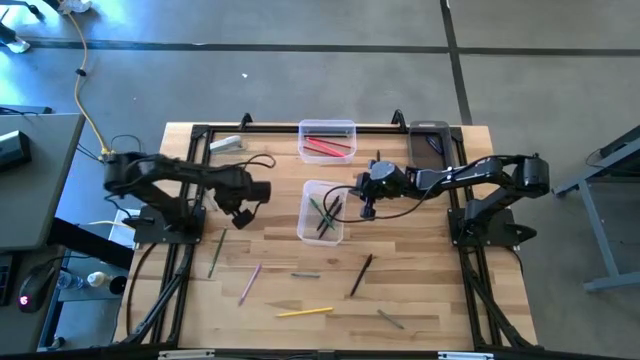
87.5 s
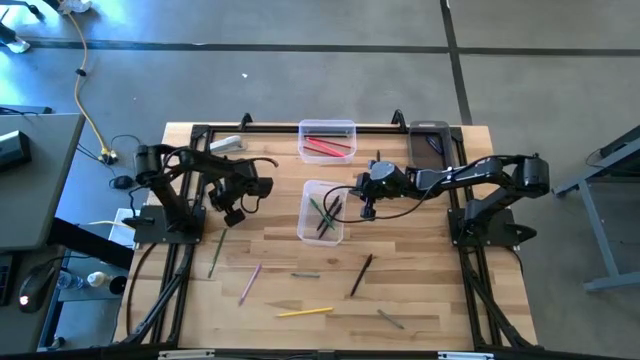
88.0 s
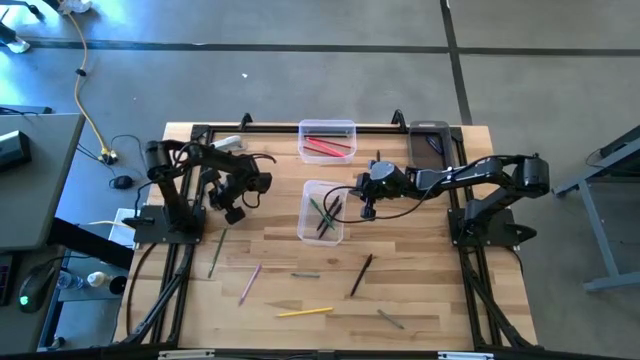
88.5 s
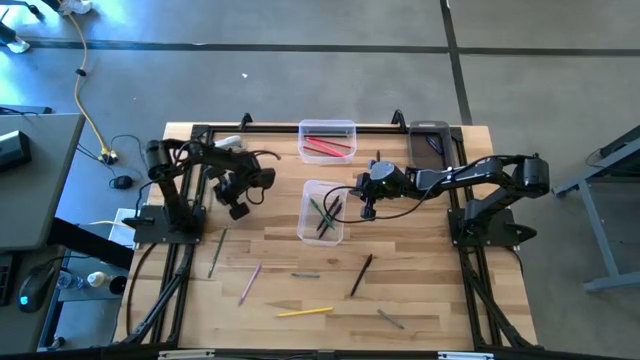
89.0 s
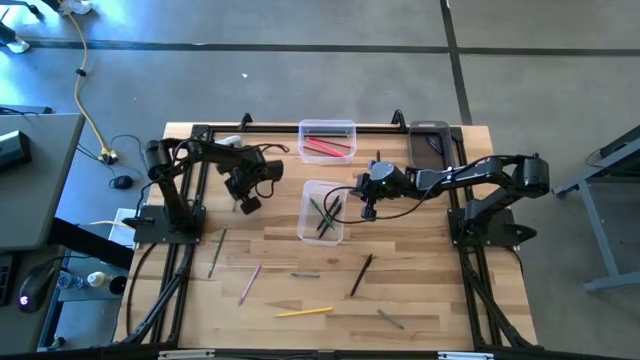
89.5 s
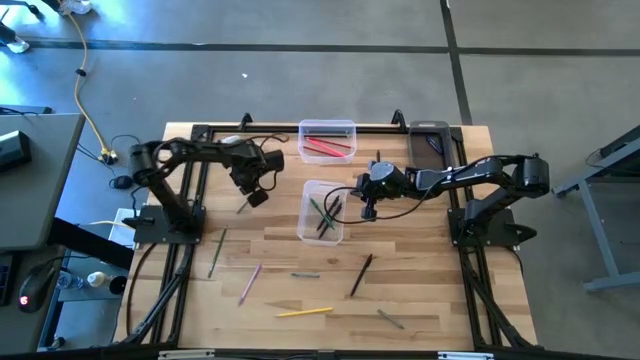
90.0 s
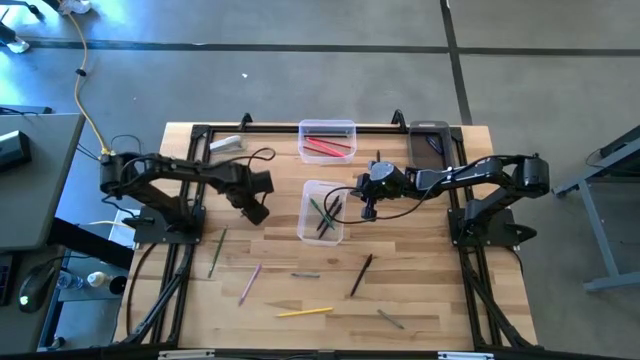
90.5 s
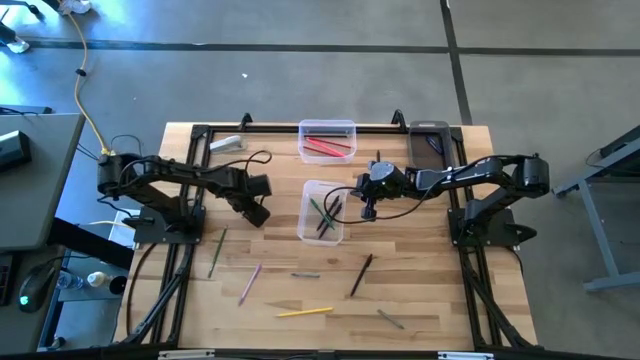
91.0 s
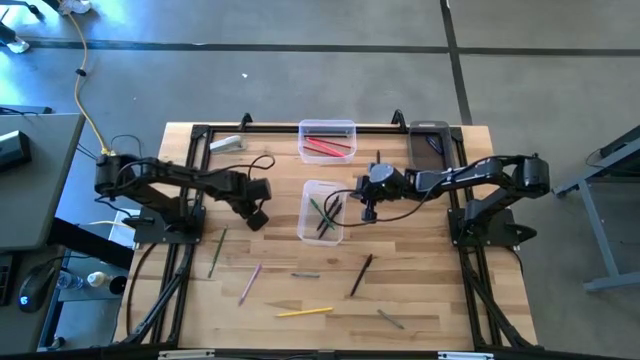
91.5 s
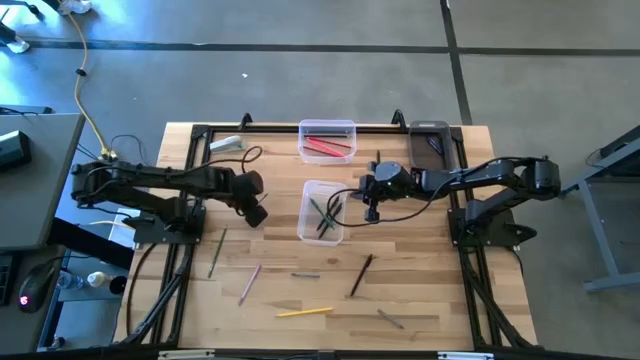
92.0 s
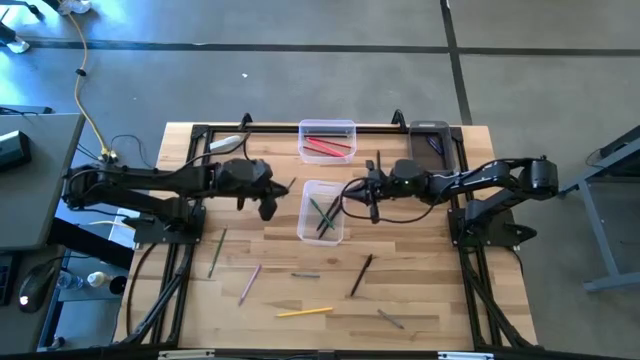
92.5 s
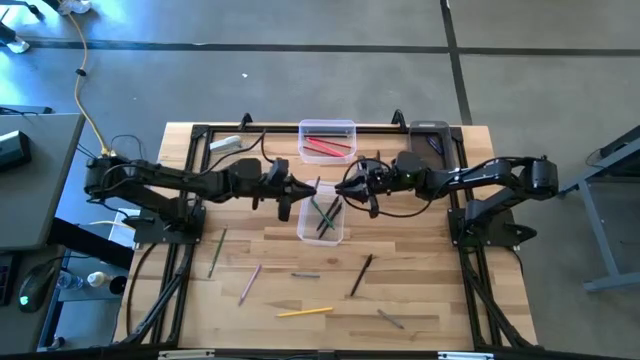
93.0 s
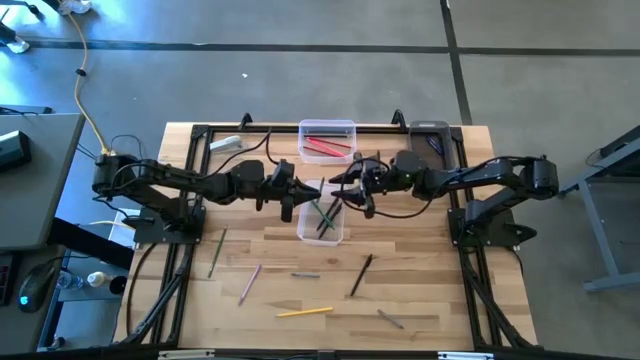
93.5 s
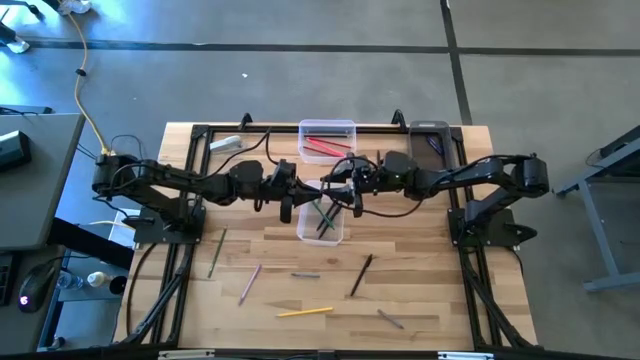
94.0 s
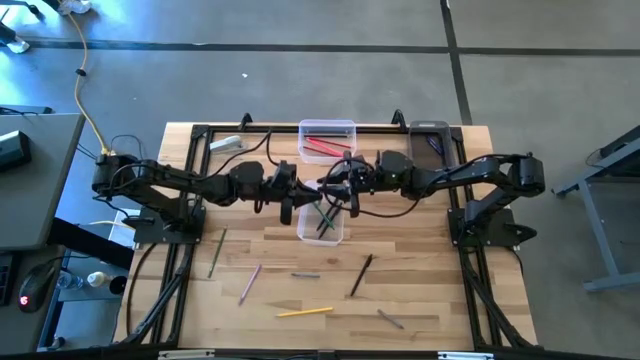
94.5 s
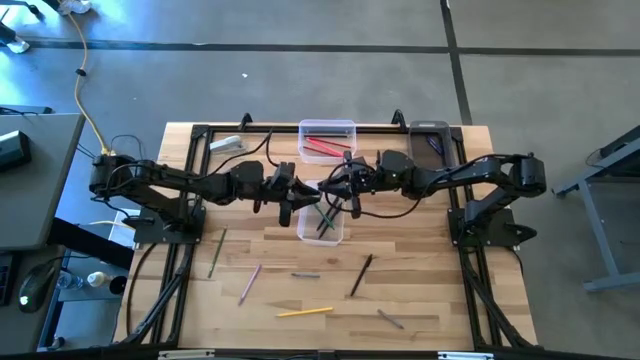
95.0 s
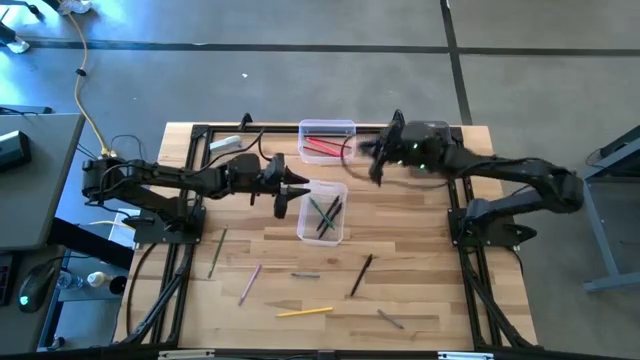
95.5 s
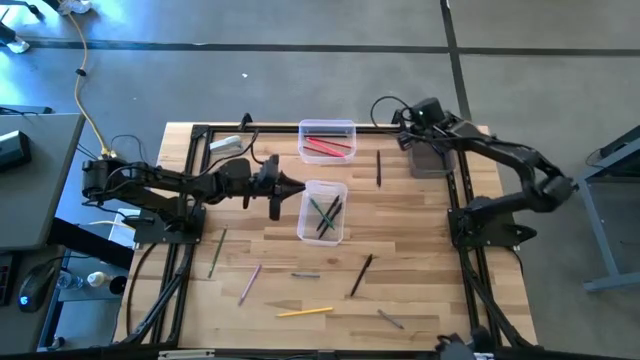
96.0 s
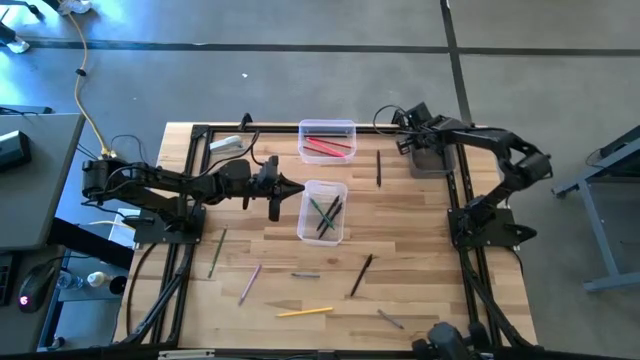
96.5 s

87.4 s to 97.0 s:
Task: Sort crayons/erasers/pens/pencils in bins
Put the gray crayon into the transparent black bin

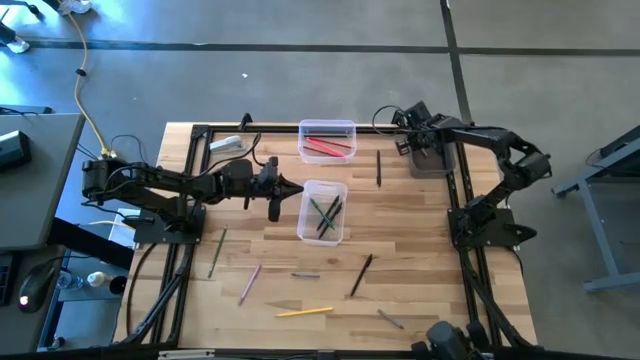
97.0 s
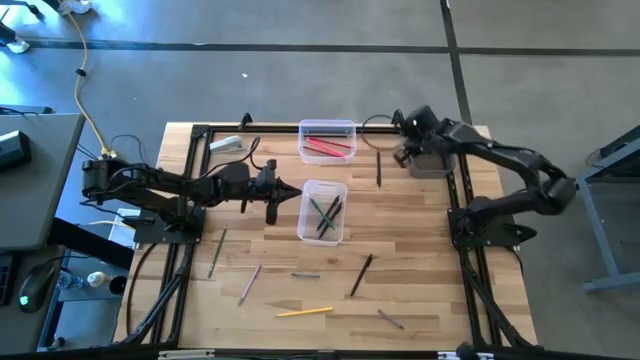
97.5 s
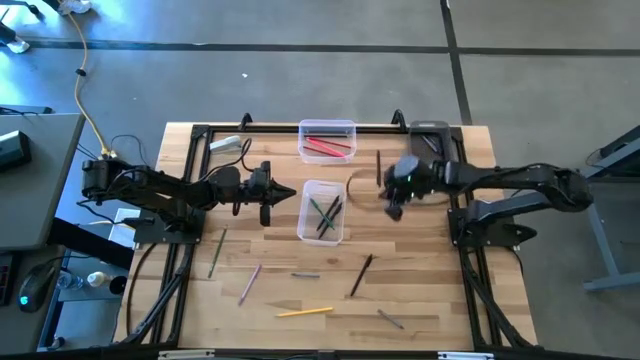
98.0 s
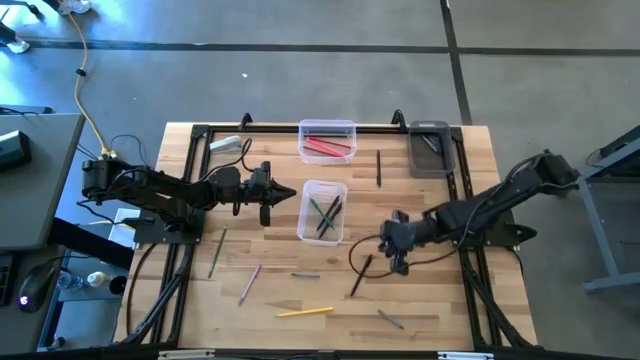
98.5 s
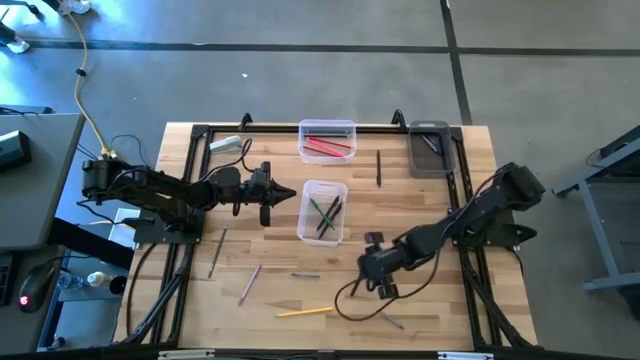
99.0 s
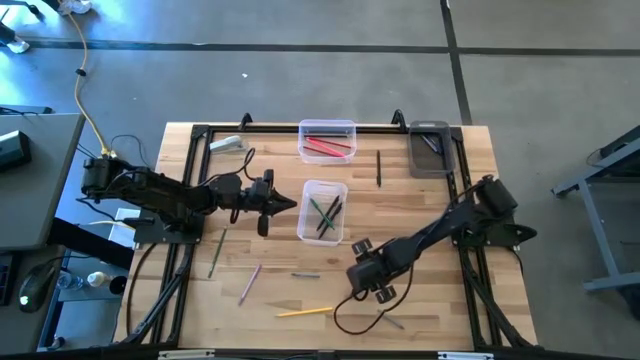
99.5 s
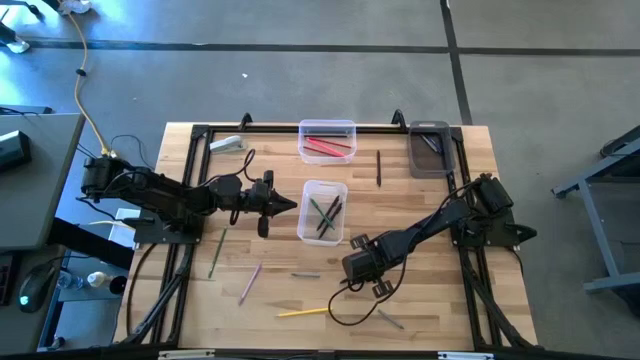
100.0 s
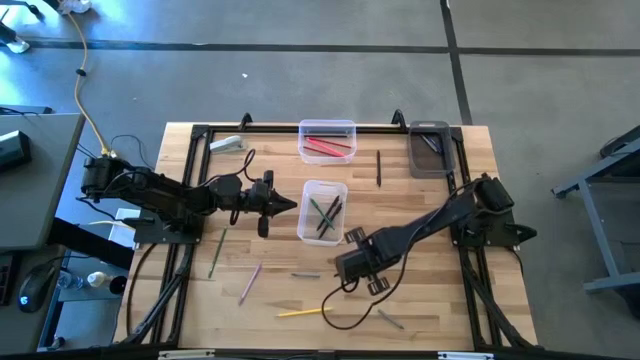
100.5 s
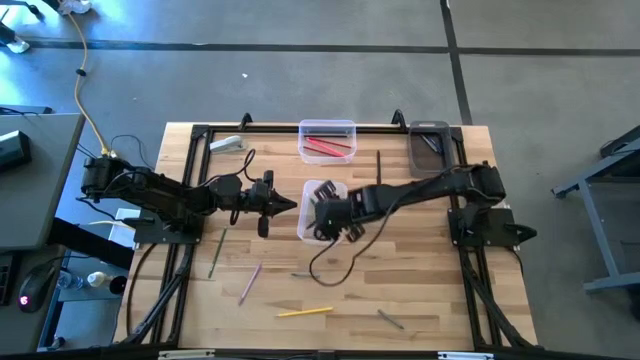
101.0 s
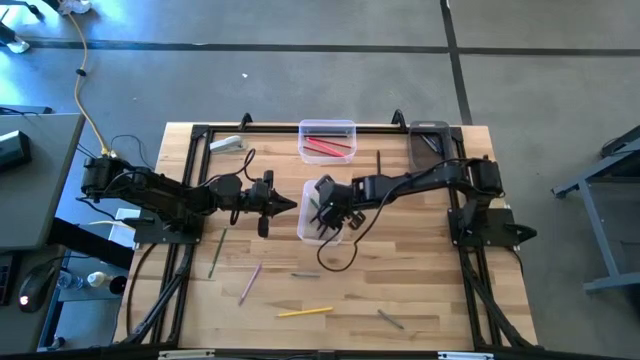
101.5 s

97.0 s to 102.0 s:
Put the bottom right black pen into the bottom transparent bin

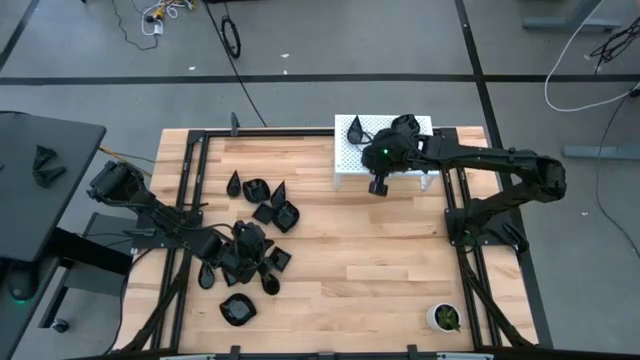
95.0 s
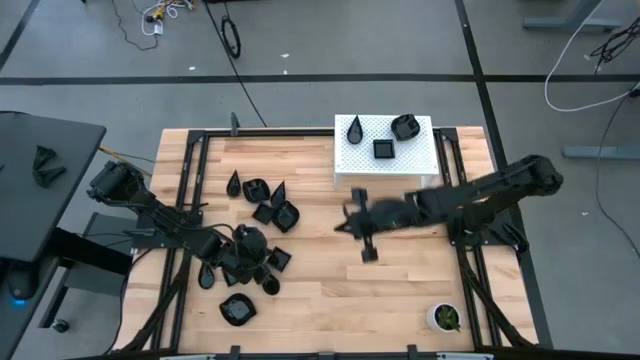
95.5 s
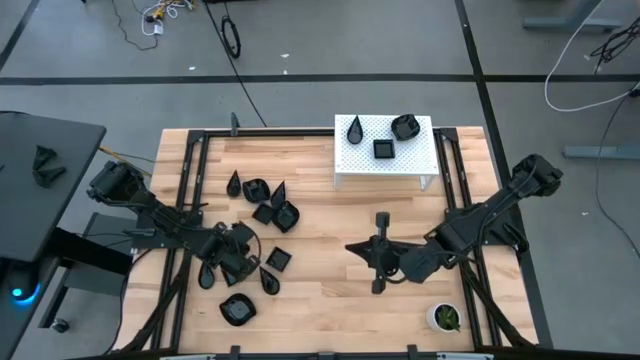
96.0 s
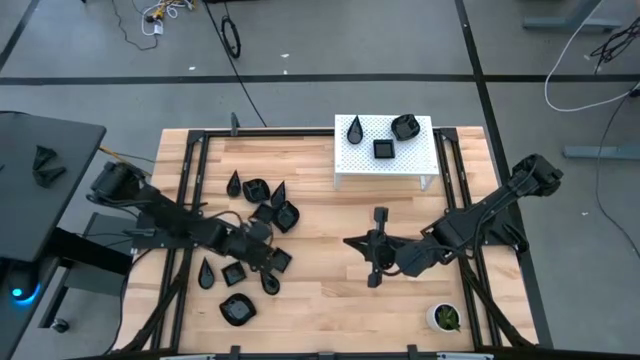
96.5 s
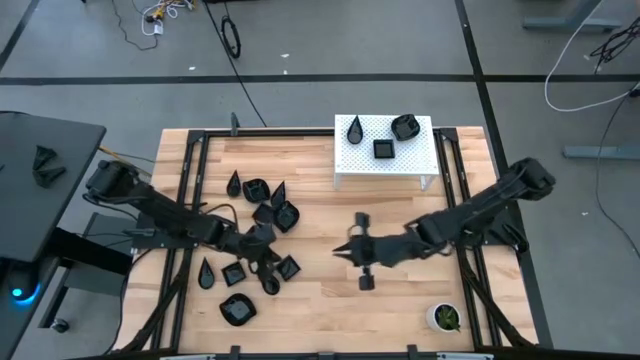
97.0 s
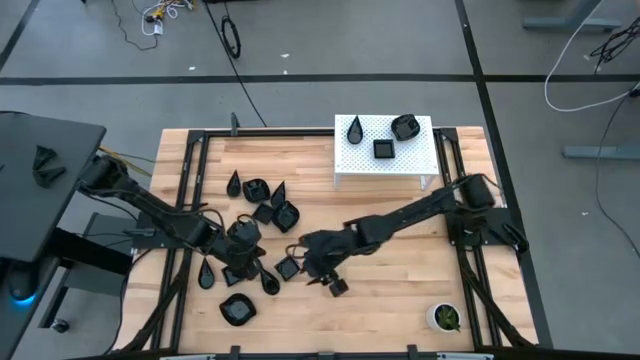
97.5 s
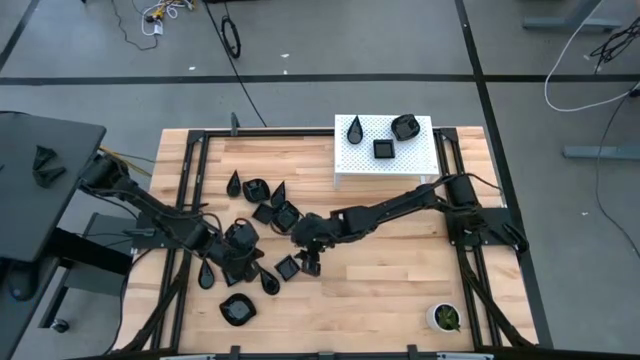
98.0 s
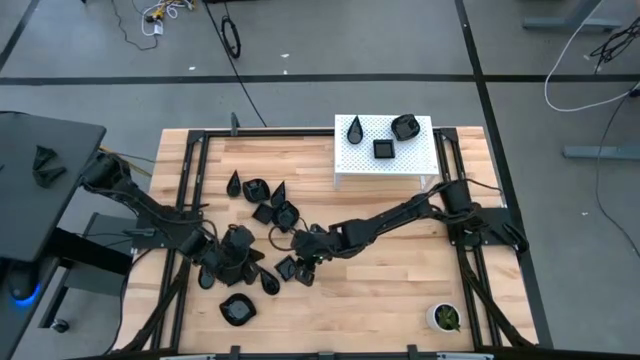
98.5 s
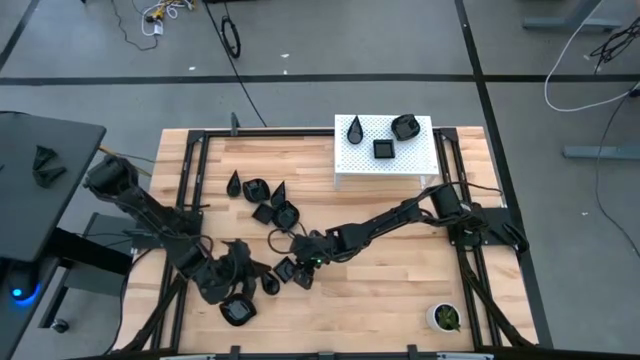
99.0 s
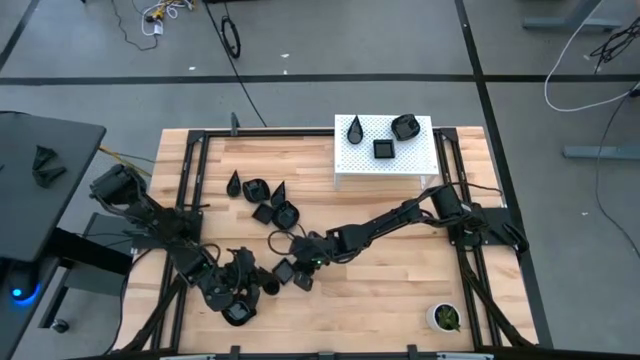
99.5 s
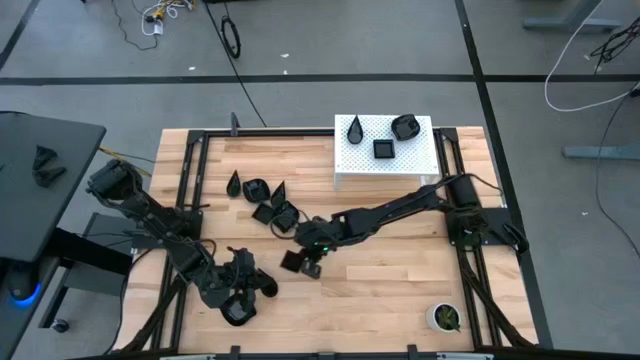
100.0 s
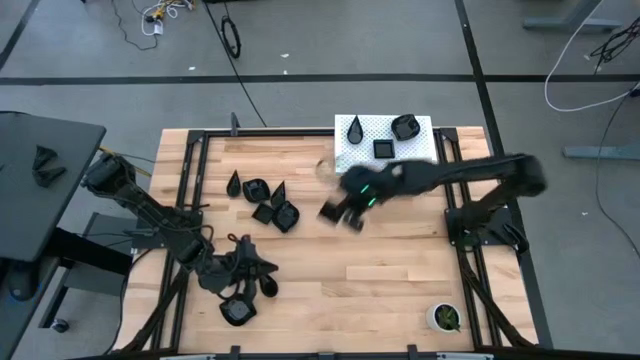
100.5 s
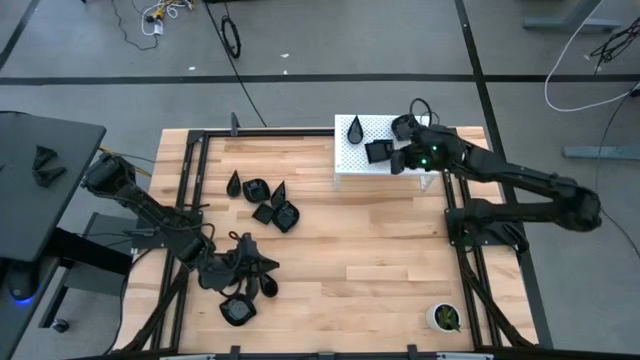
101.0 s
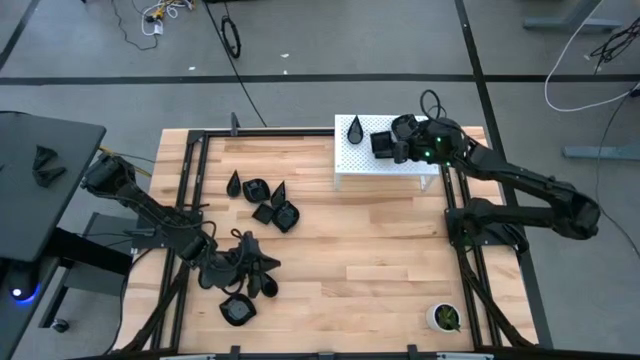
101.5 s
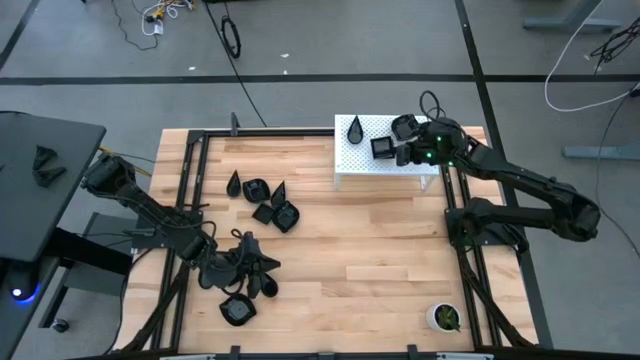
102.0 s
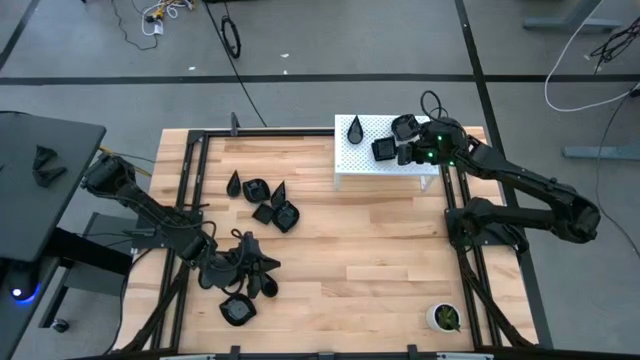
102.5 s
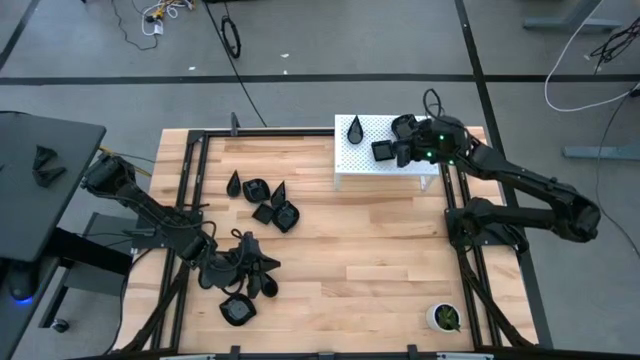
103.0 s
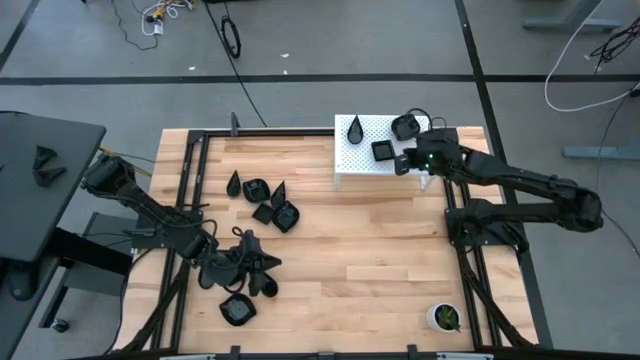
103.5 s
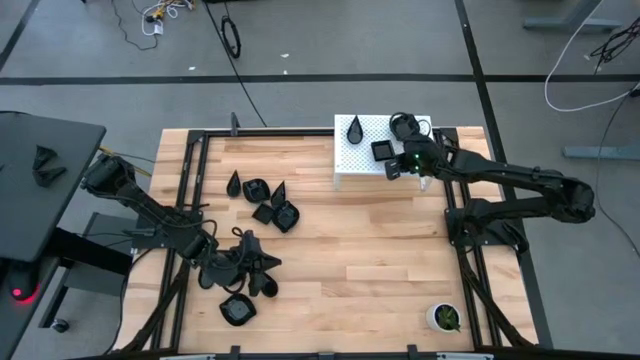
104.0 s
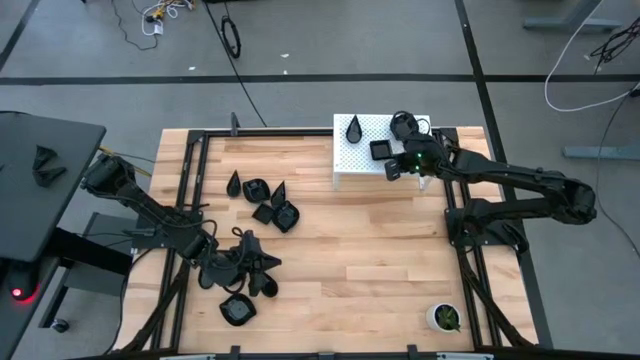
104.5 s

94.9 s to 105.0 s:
Task: Pick & Place Mini shaped plates
Stack the black square plate on the black square plate on the shelf
